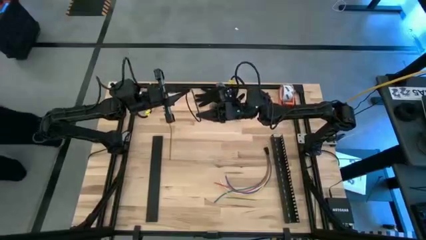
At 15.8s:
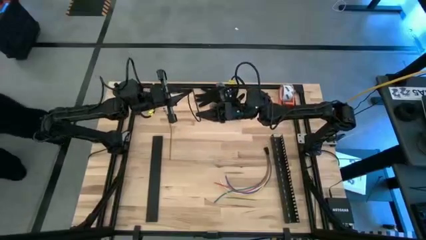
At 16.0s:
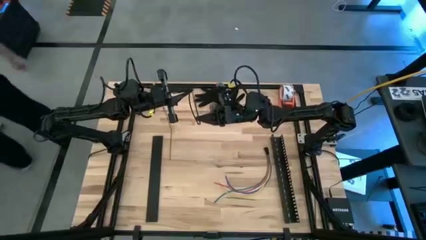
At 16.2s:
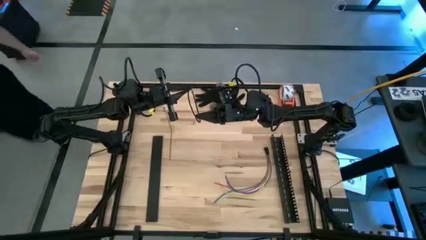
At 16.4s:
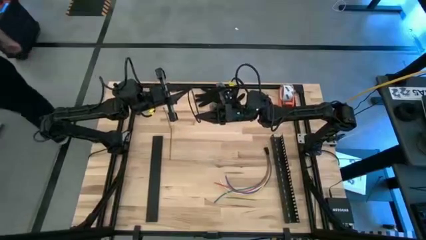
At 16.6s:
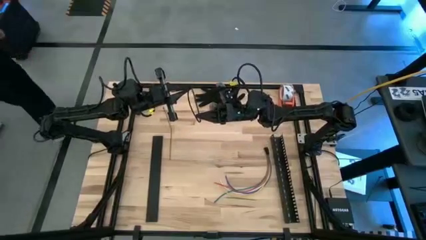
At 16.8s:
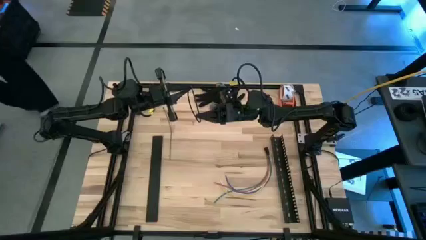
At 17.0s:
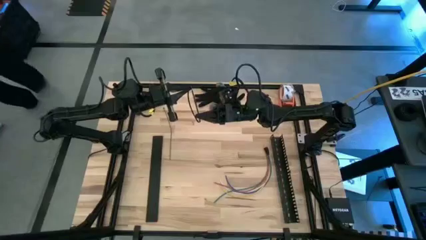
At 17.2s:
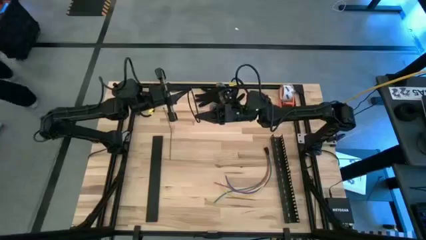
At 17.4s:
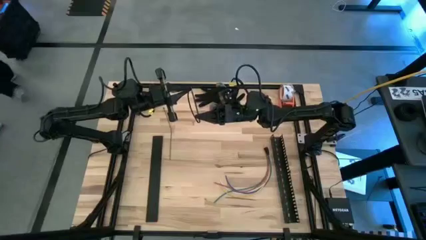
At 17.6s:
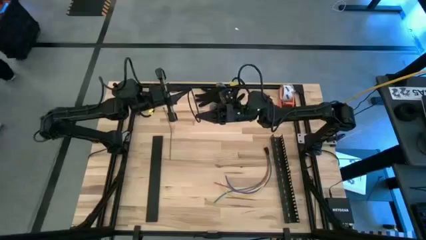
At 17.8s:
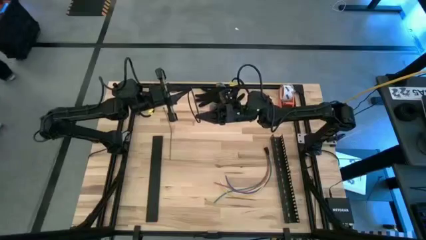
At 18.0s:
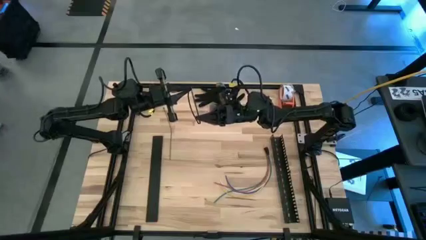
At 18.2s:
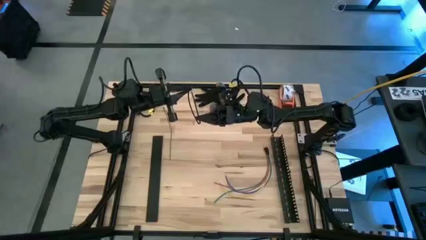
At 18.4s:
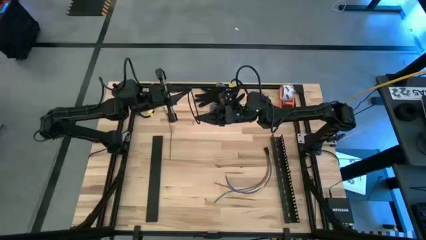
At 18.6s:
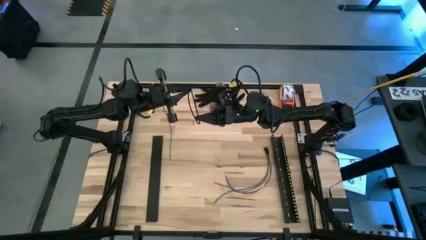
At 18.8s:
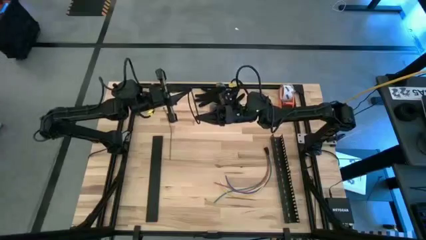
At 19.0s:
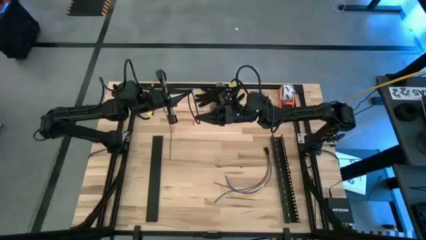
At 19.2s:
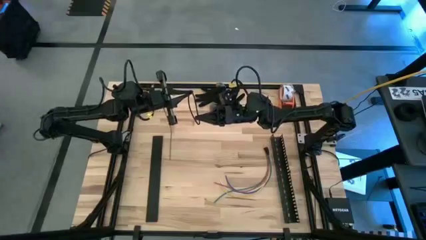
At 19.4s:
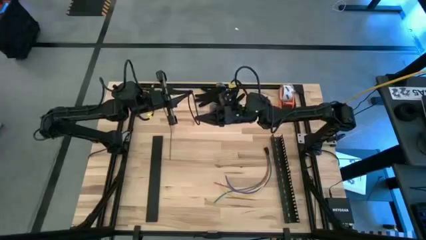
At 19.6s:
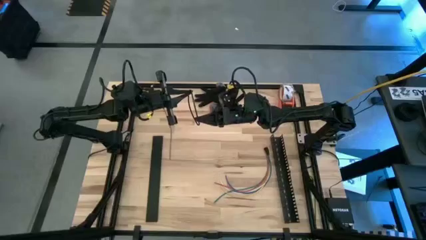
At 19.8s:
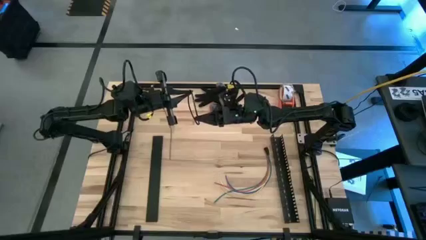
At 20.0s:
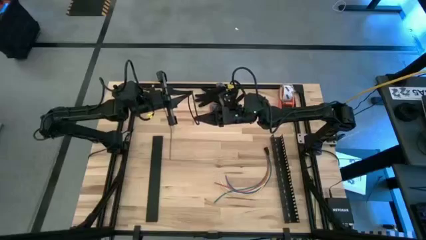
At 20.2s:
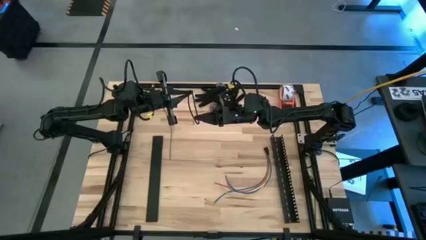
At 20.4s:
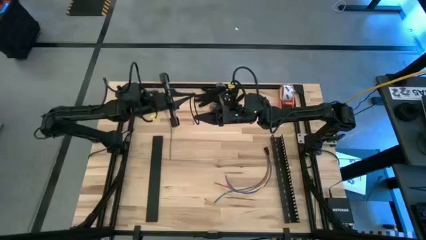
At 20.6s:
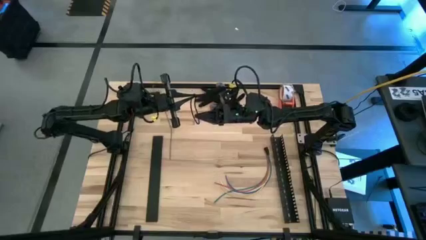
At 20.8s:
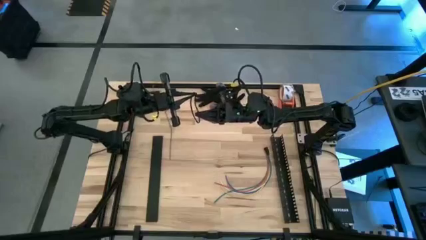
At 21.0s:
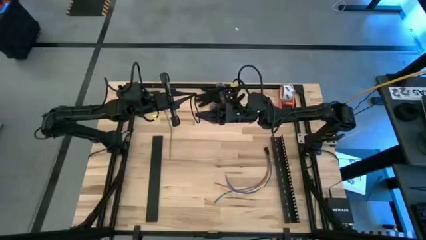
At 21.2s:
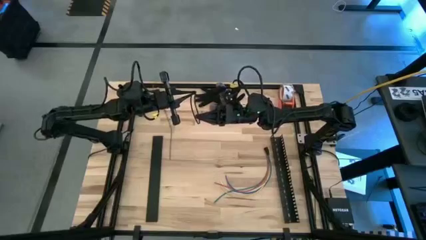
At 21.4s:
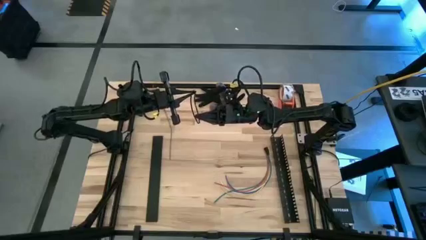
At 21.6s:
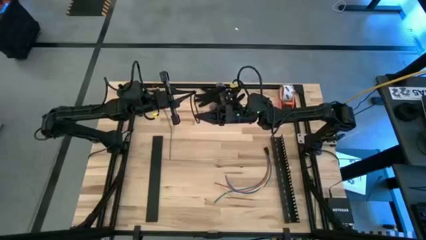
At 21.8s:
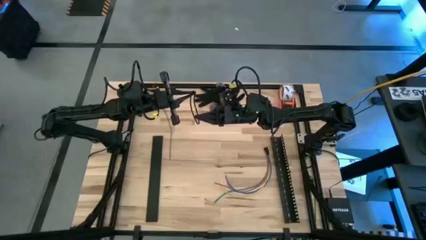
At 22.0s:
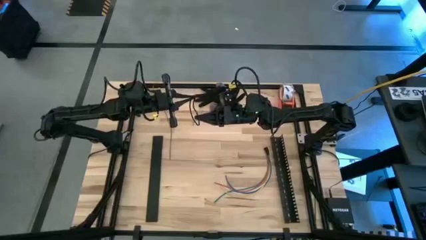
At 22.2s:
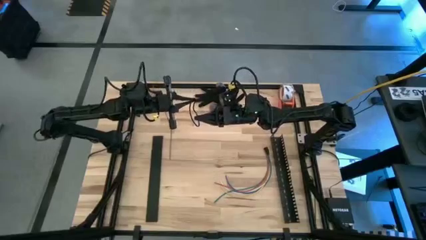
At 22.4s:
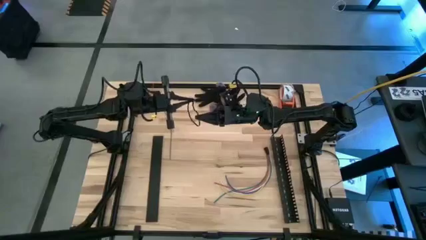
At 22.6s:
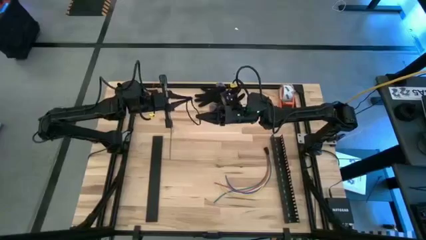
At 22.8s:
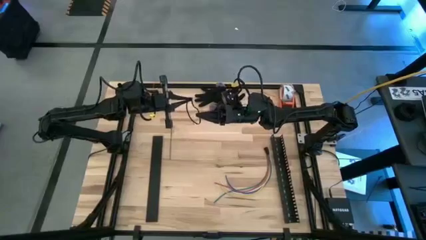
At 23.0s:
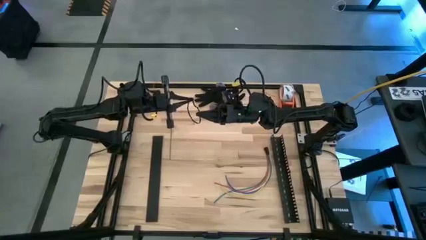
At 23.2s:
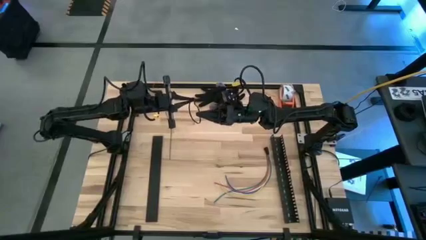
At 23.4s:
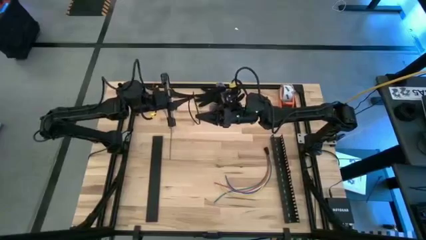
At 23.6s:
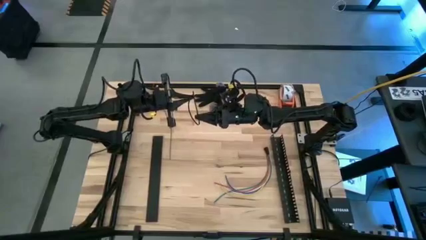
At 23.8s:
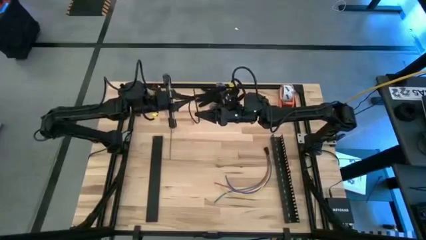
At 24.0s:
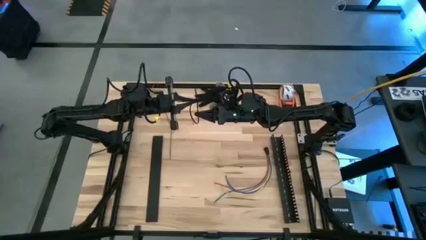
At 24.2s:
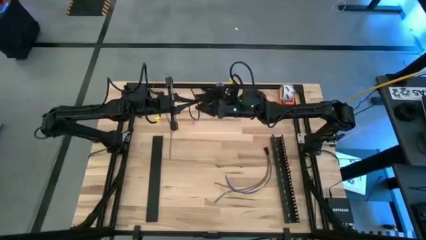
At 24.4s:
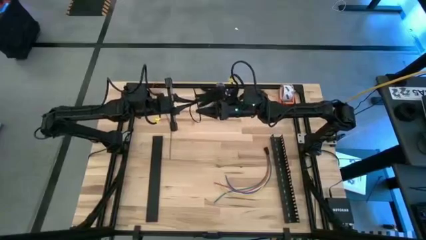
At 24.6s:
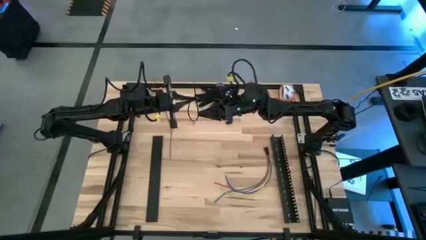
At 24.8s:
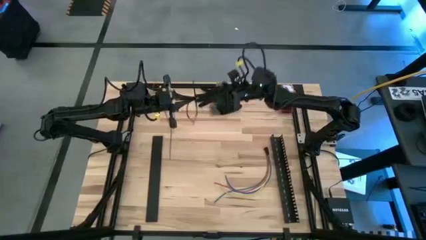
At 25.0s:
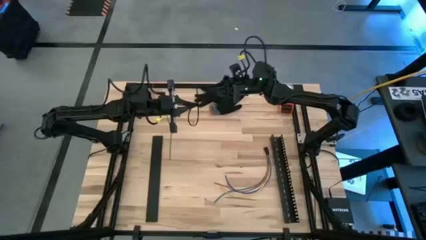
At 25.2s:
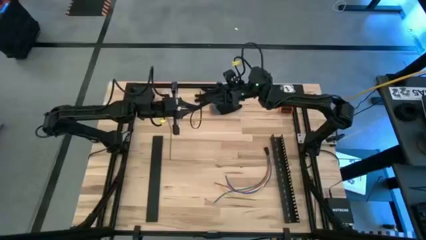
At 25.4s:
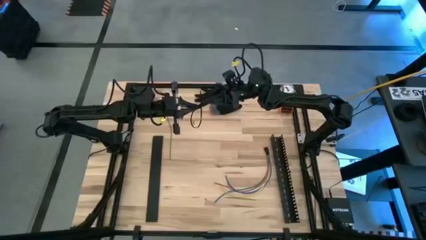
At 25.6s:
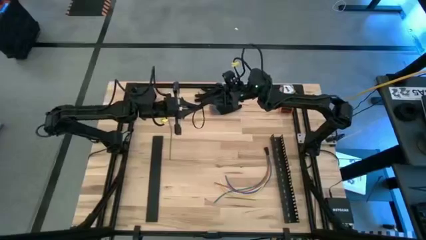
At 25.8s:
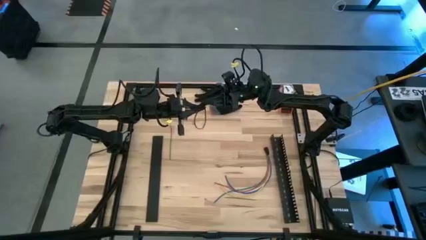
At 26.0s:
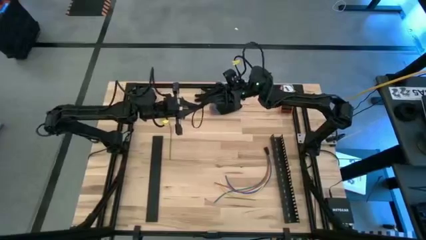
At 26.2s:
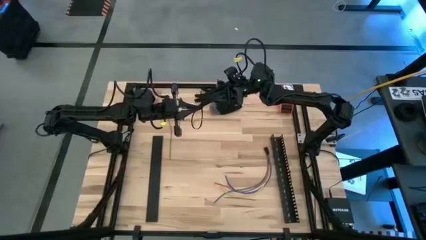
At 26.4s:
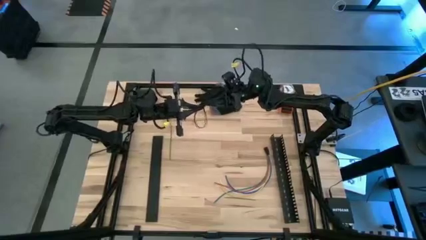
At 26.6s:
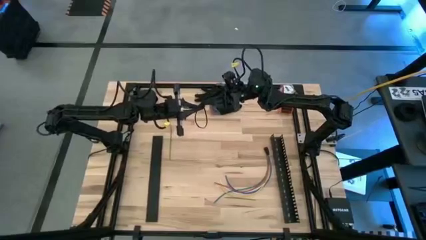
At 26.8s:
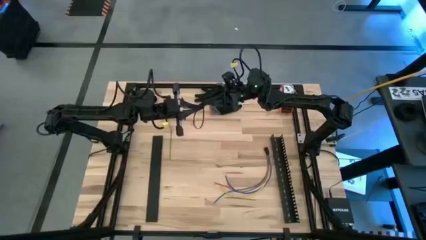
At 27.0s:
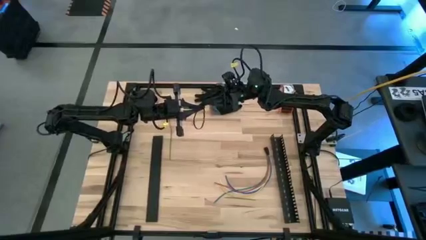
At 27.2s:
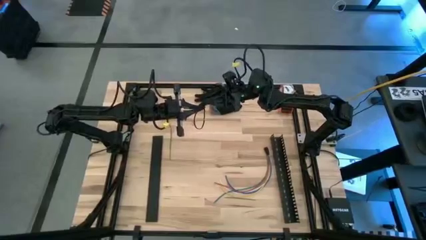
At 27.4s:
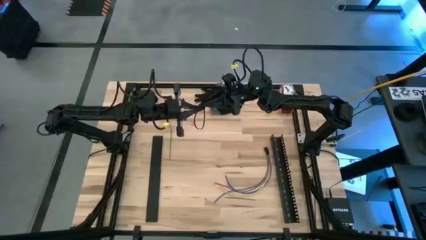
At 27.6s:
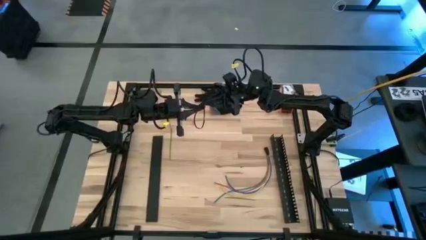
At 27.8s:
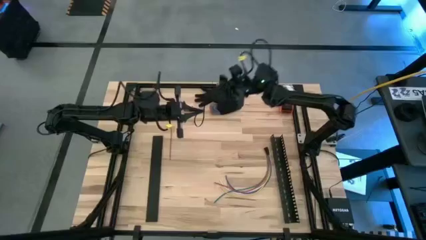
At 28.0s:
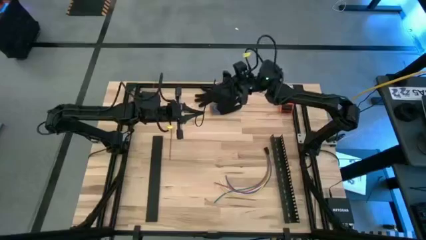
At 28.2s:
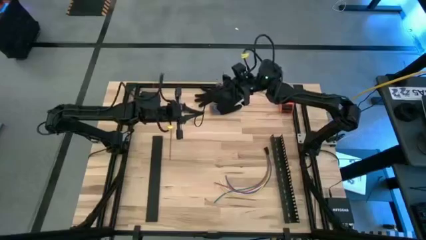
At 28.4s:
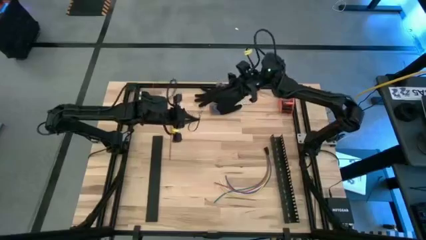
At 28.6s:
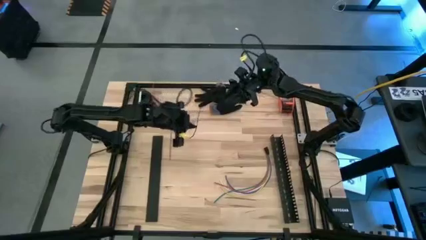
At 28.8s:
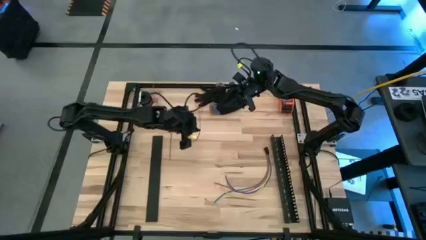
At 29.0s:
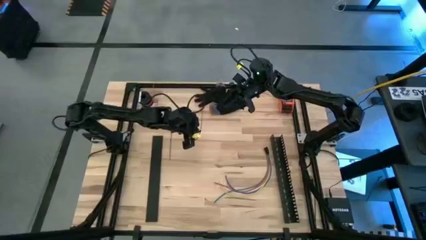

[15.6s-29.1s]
Task: Ziptie cables
Insert the right black zip tie into the locking head

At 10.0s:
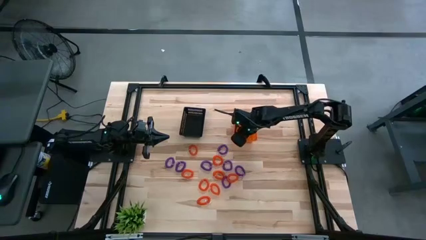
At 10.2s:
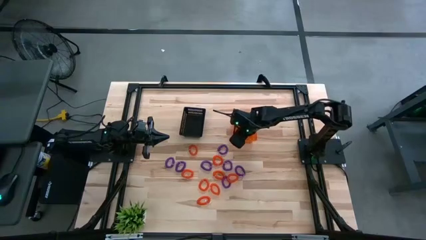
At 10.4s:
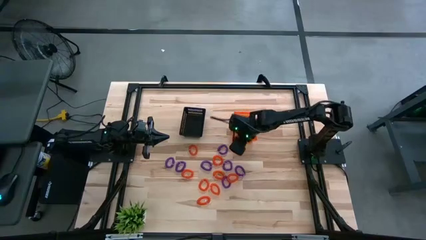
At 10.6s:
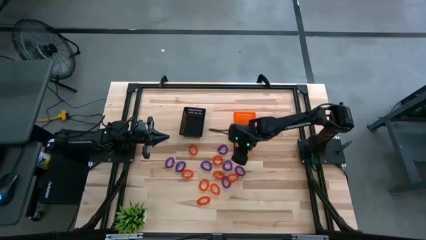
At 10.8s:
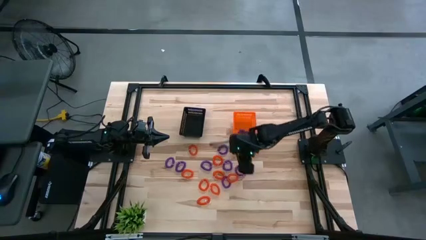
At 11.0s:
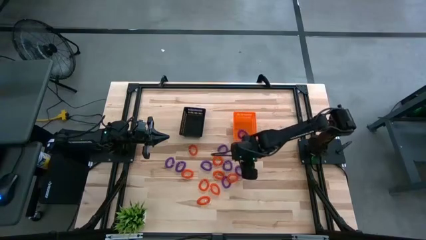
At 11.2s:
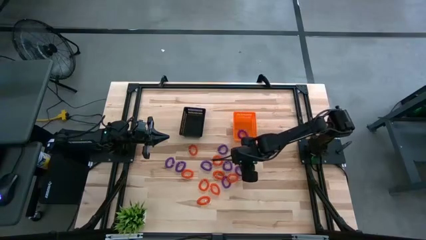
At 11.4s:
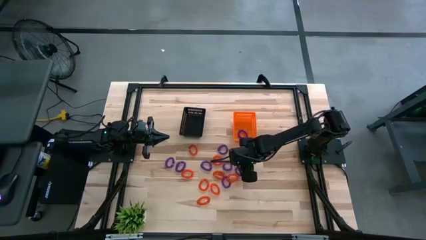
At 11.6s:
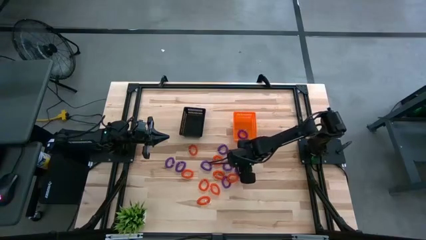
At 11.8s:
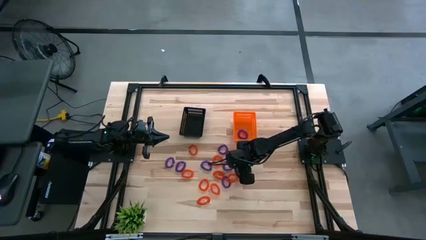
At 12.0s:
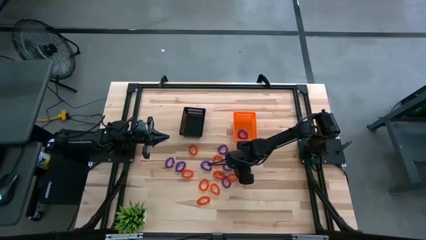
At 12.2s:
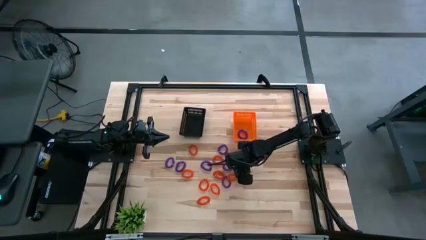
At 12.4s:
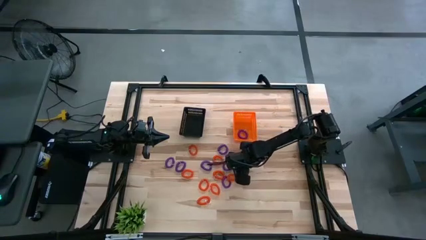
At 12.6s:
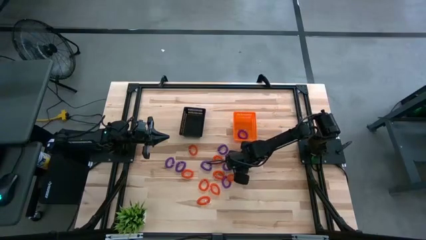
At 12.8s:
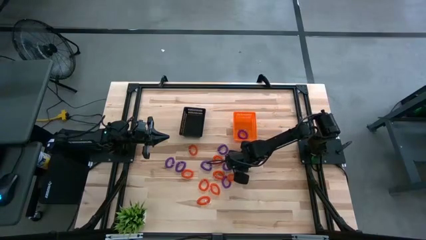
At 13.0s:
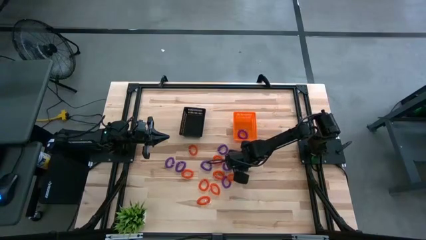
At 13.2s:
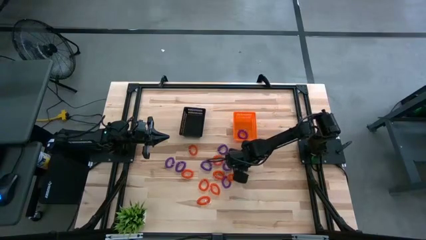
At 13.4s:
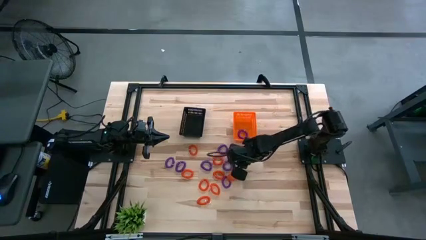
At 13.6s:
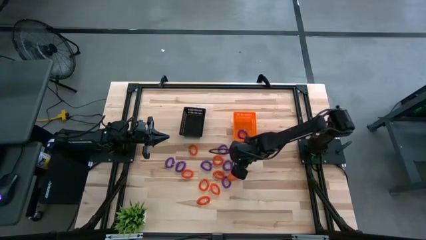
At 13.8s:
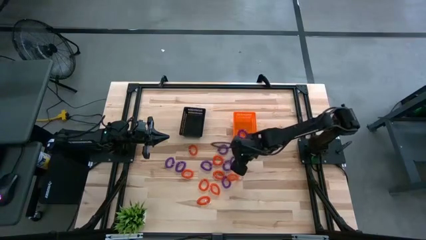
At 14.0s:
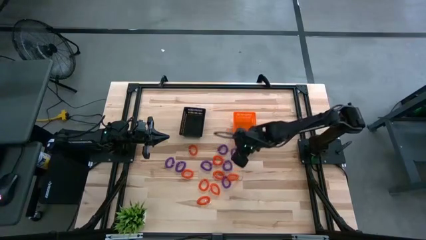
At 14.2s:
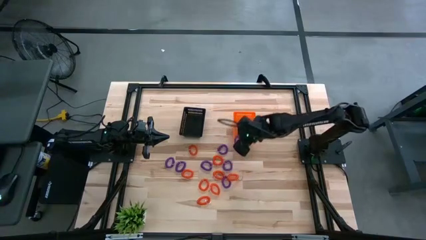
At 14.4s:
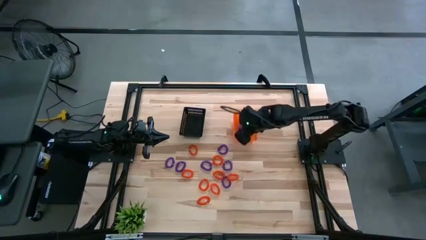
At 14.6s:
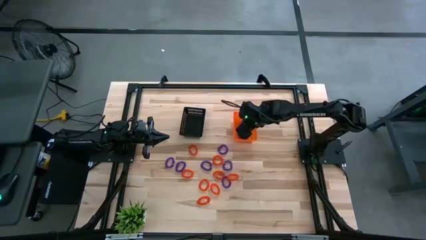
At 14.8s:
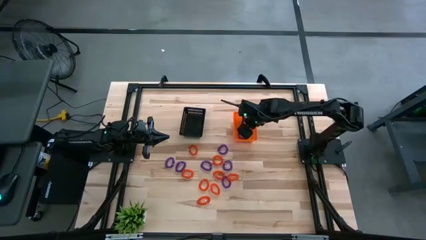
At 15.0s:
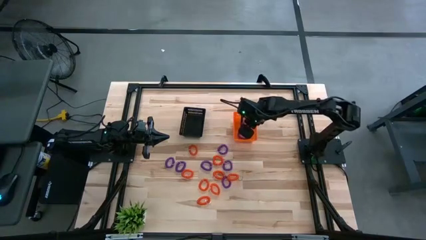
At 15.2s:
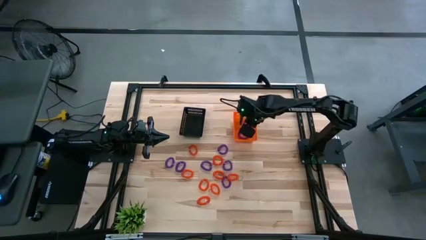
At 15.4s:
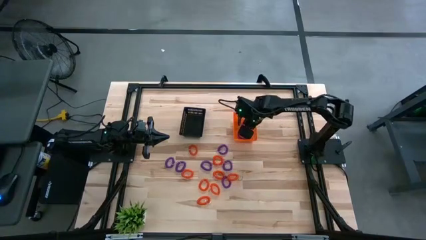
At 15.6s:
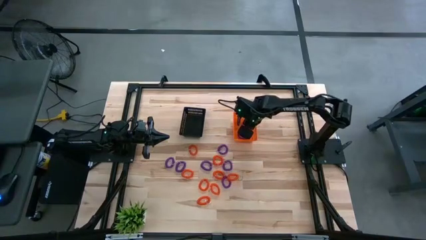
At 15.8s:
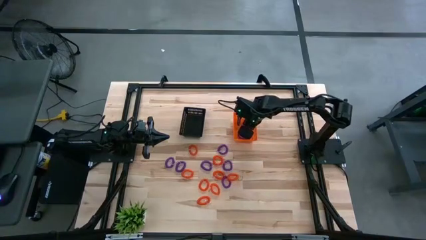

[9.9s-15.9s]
Task: Sort spring keychains into baskets
Put the violet spring keychain into the orange basket
